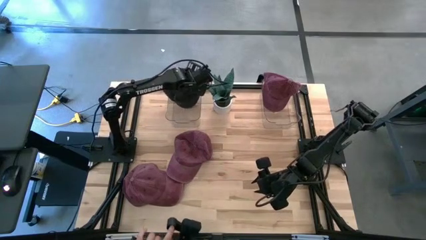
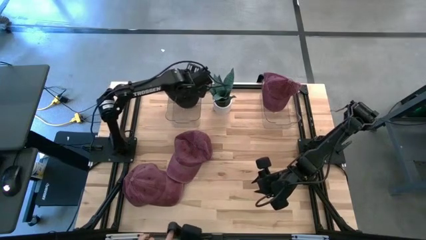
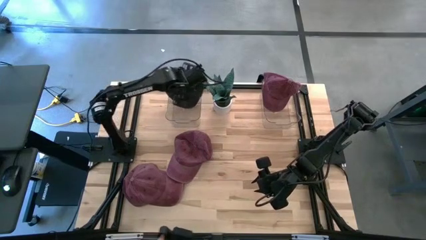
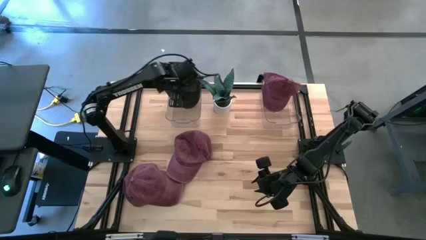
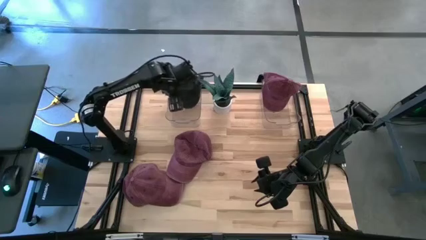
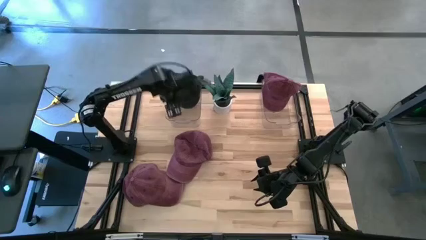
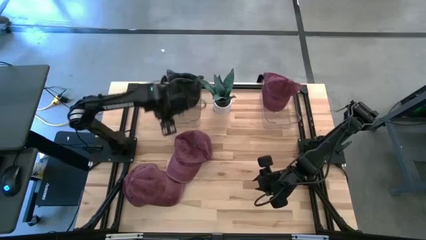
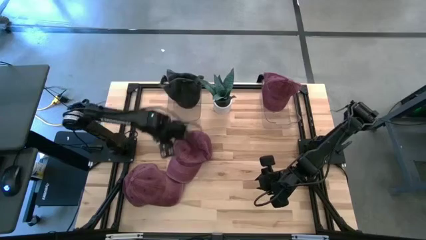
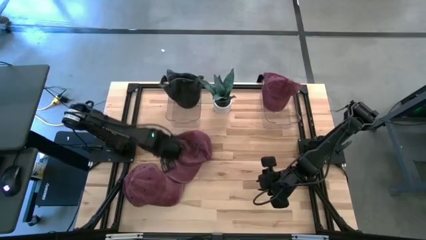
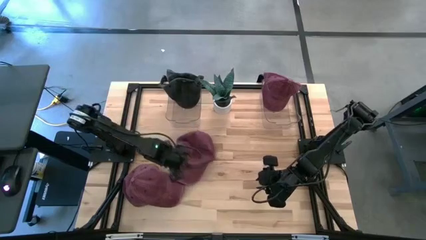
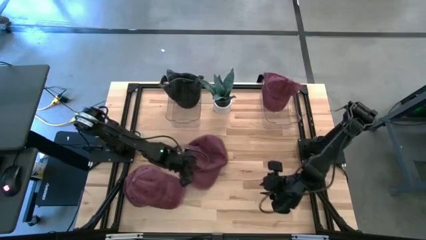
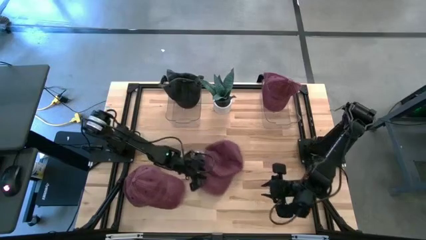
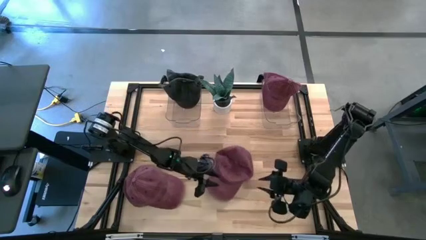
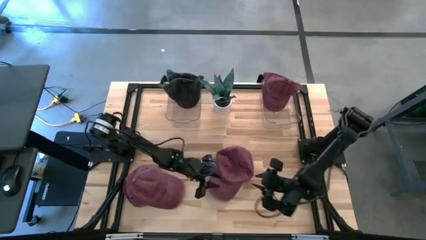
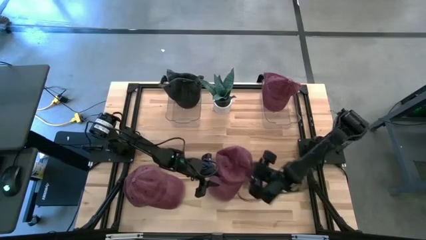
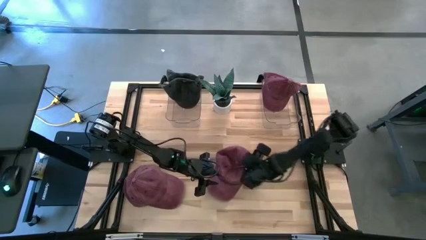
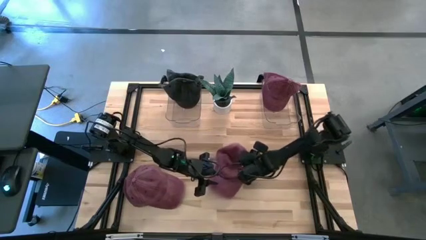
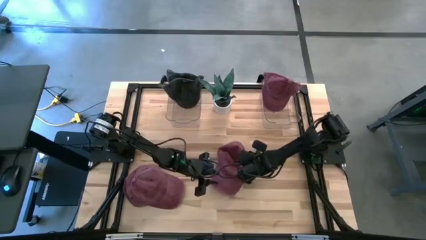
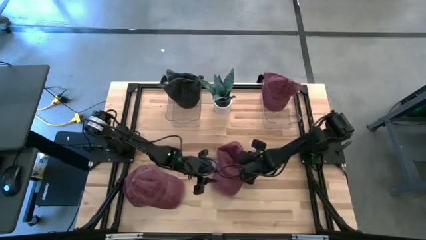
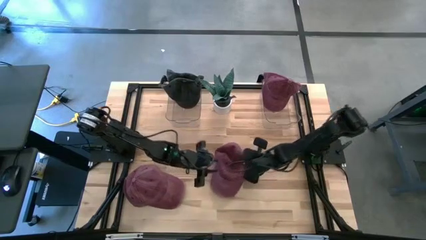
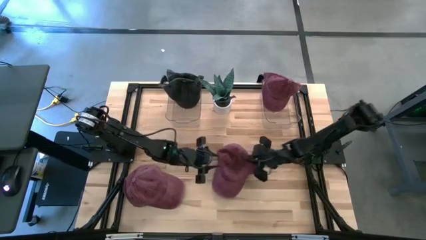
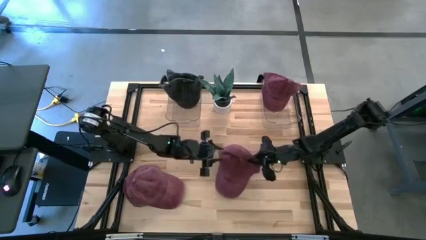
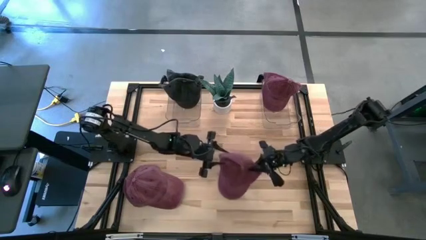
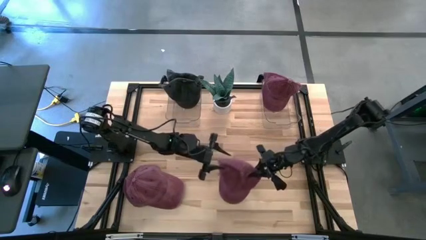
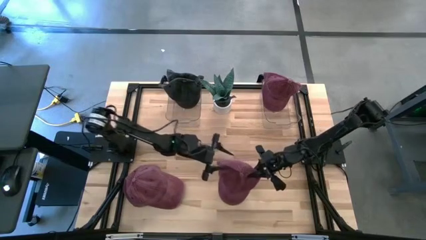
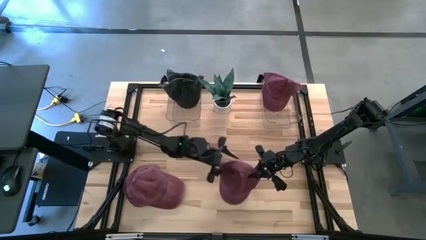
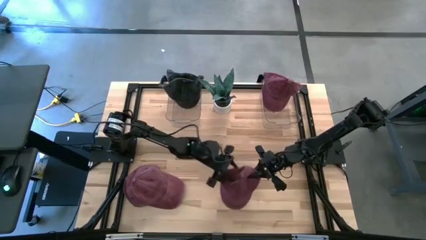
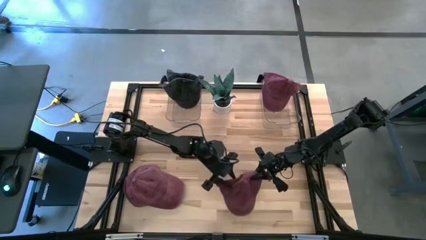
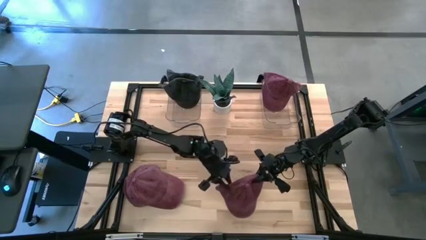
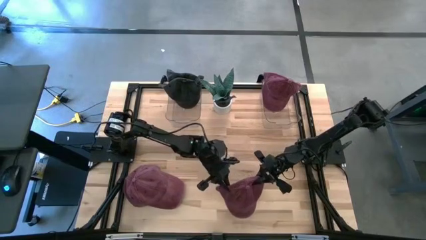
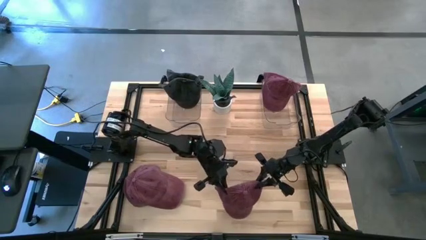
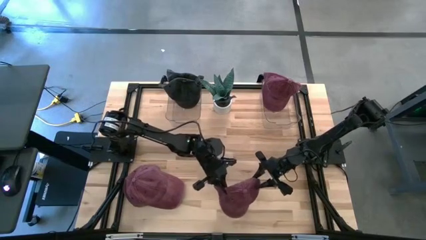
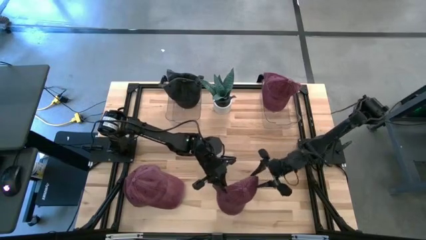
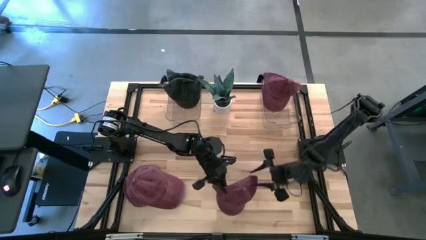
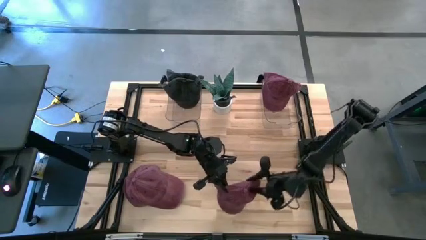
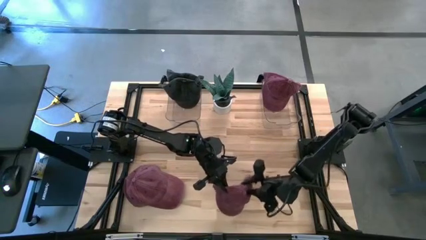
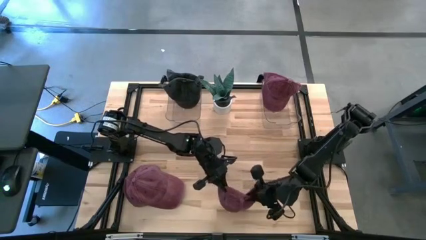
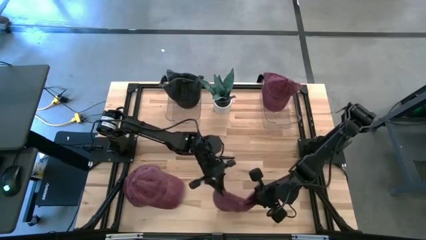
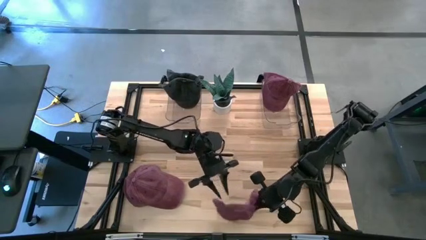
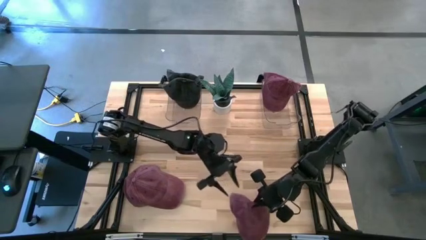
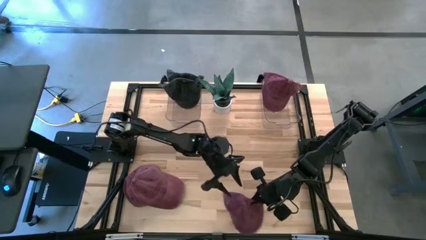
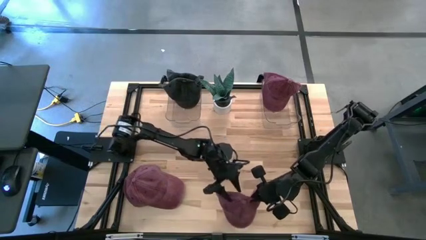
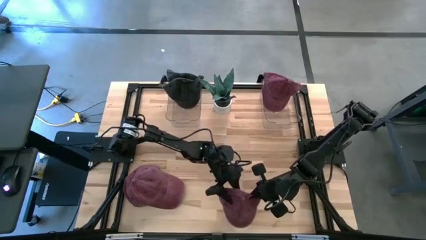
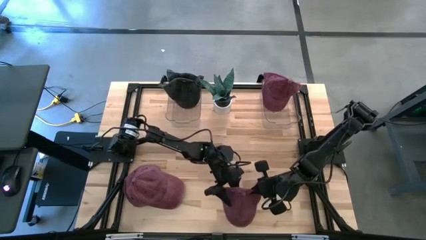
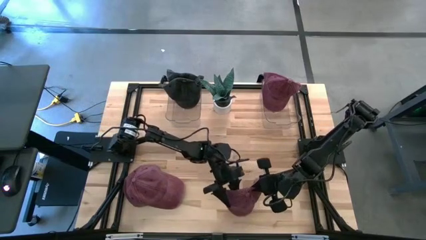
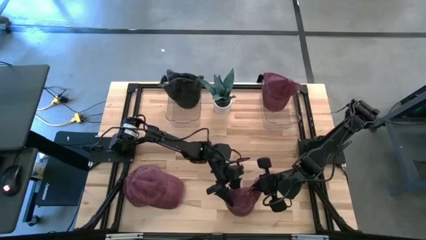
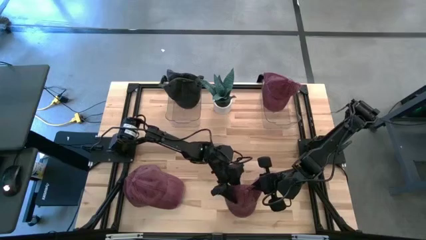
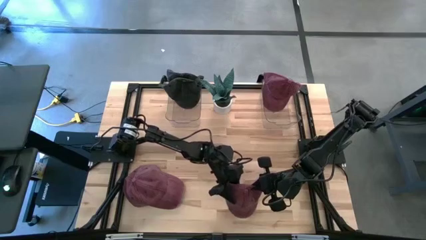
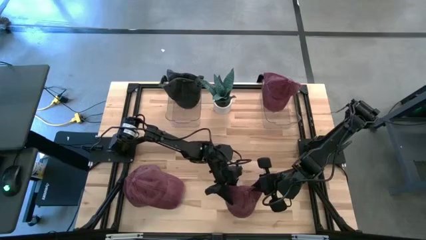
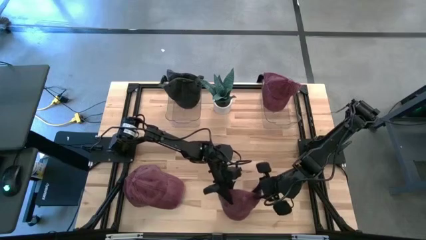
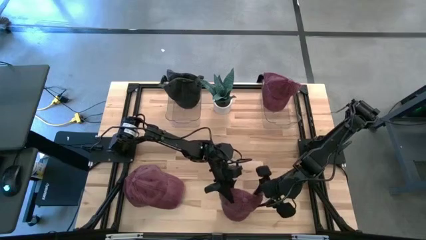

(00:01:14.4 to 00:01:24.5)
Task: Pick & Place hat
Put the top red cap into the right transparent bin

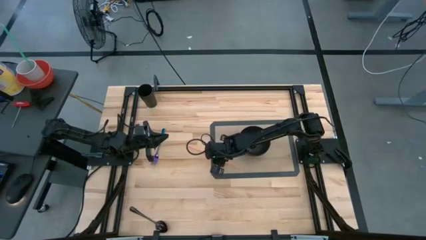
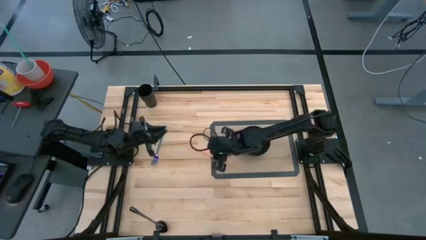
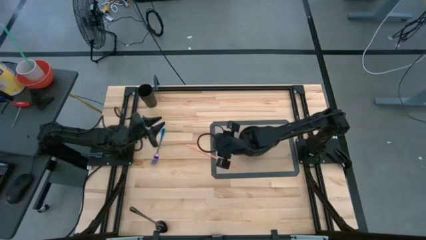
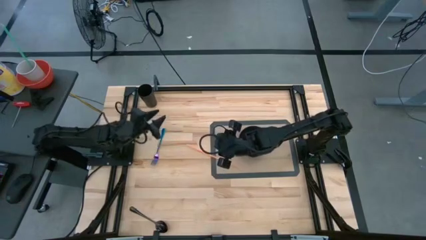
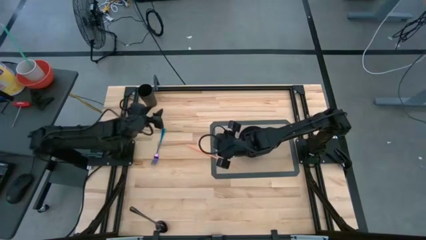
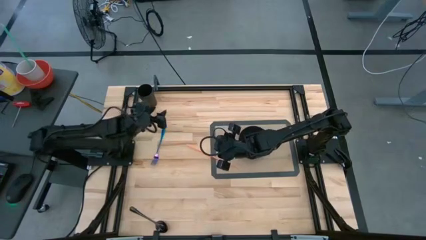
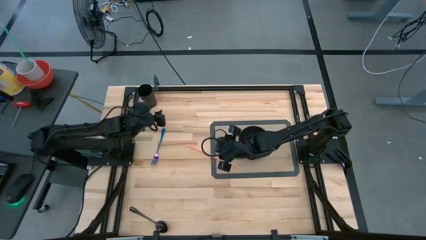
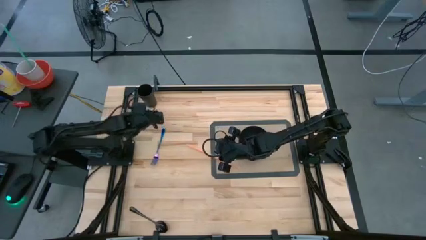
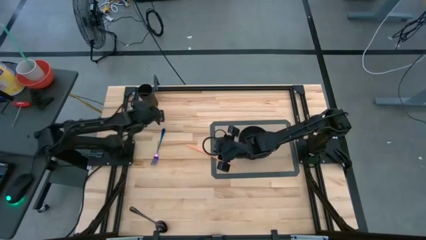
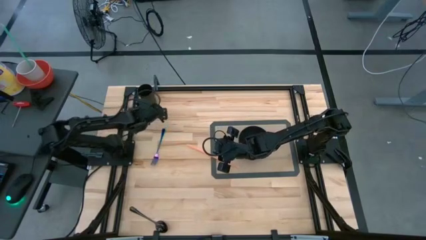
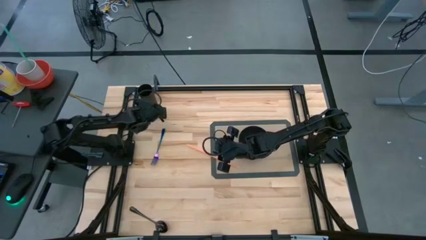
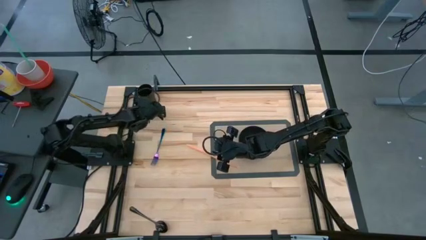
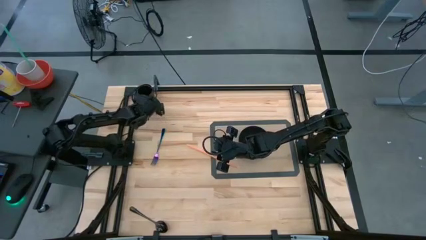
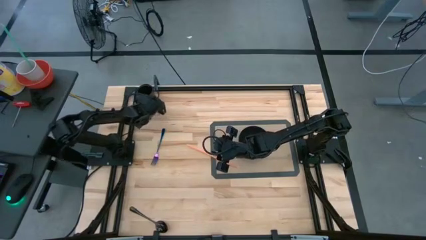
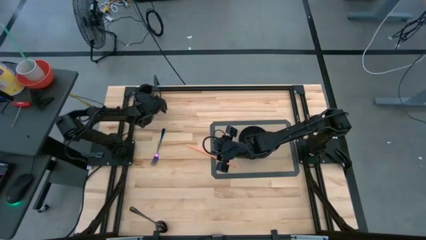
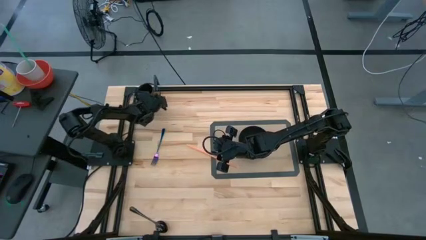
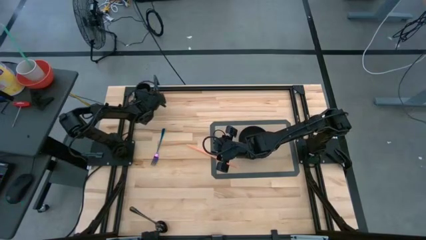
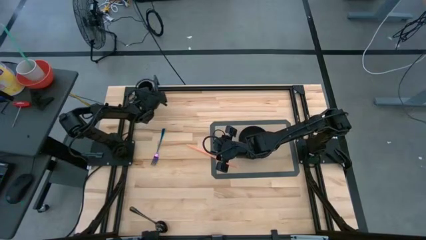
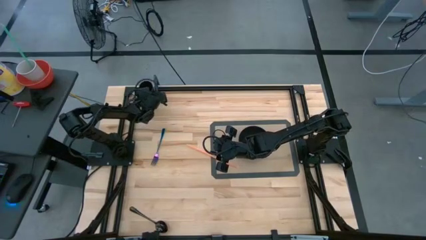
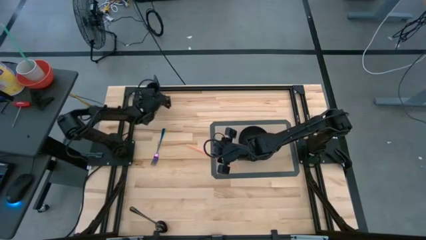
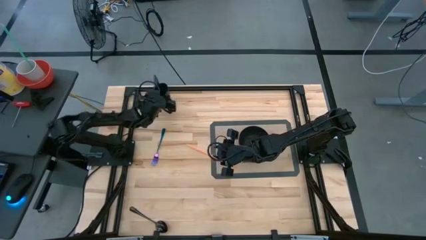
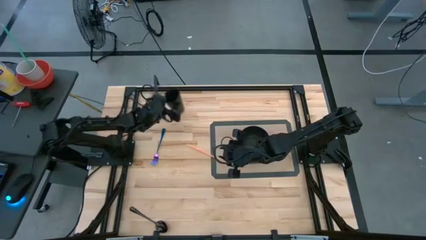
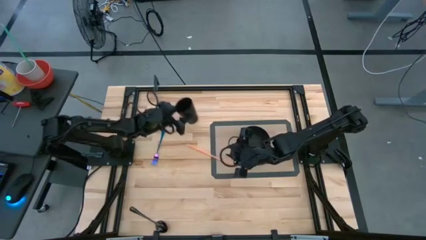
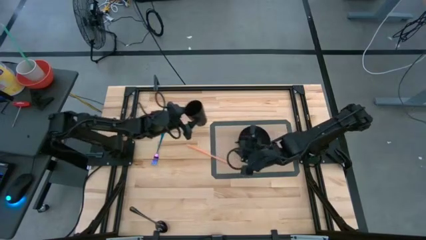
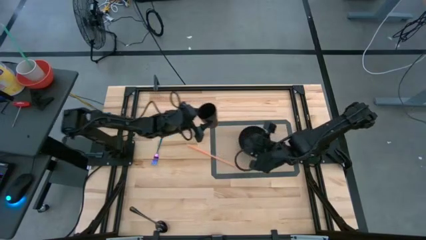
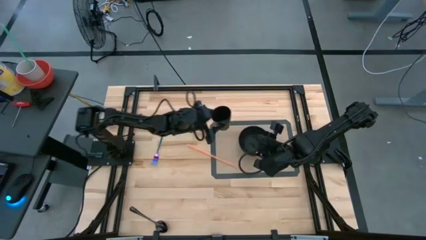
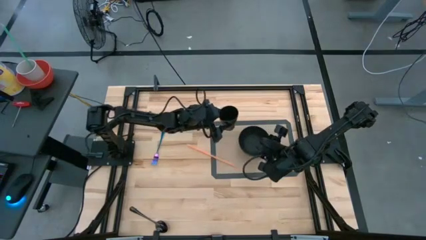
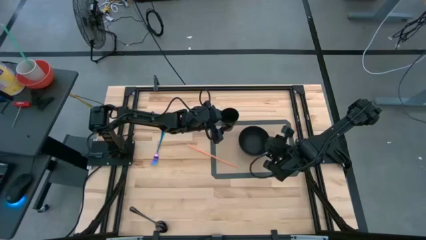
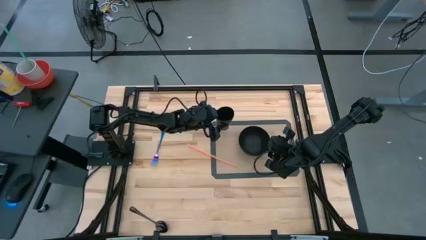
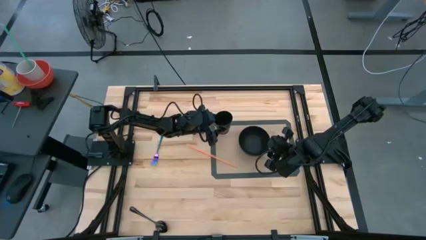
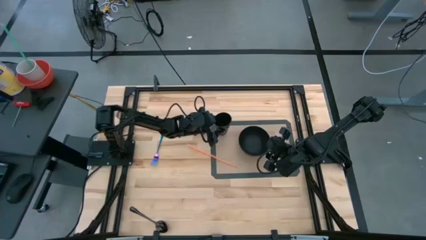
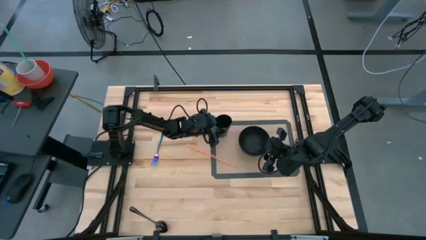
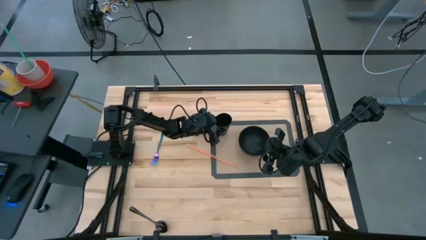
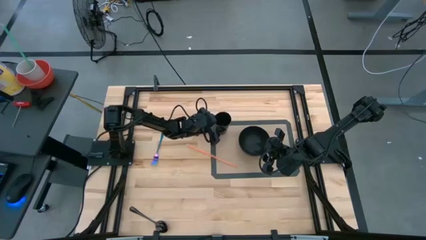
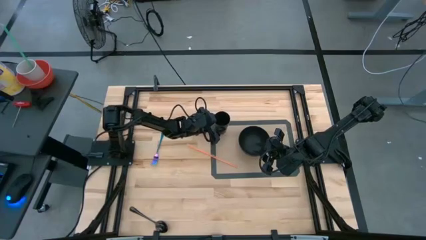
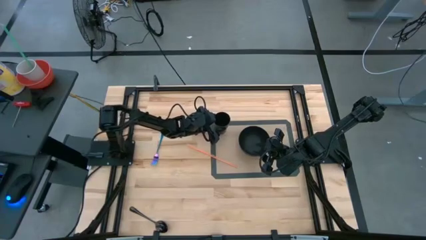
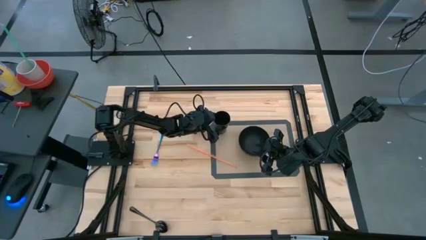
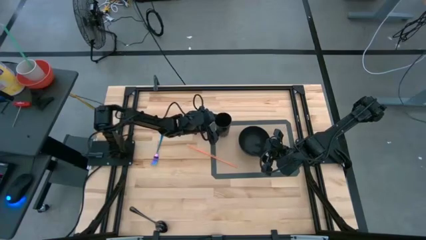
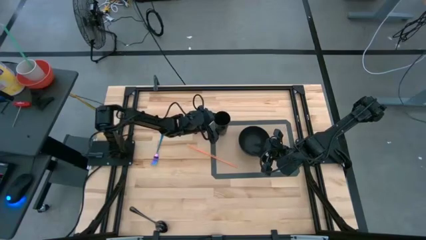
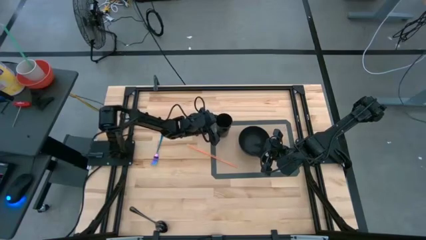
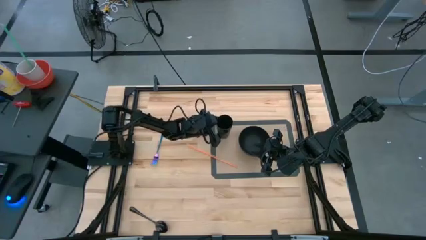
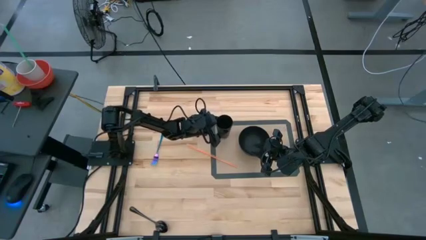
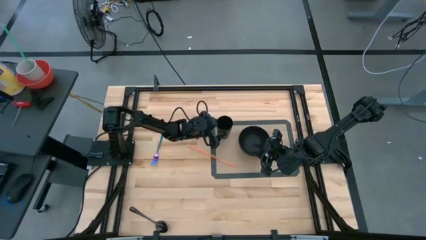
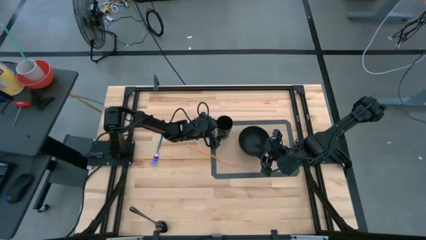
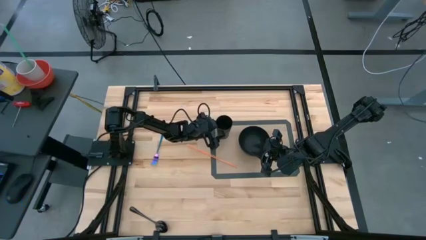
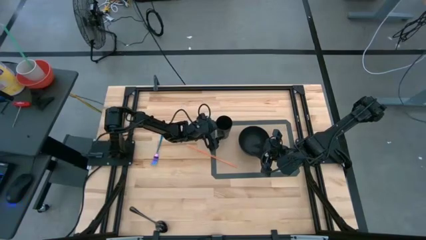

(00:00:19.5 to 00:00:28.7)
Task: Pick & Place Utensil
Put the black cup on the gray mat to the top left of the black bowl
